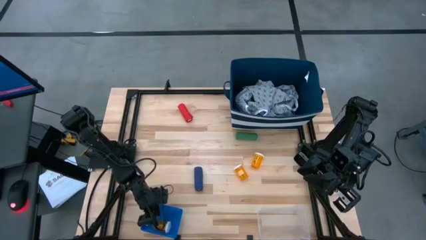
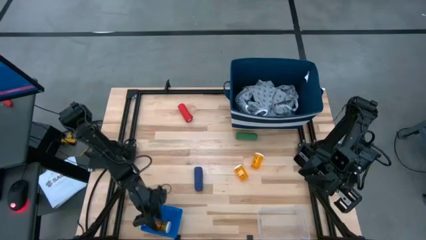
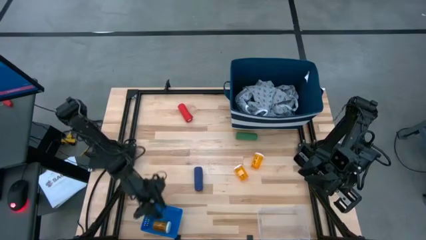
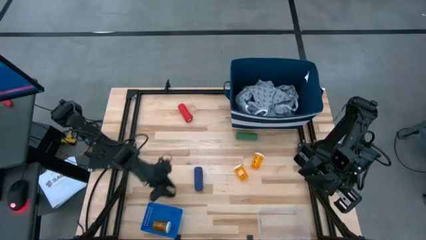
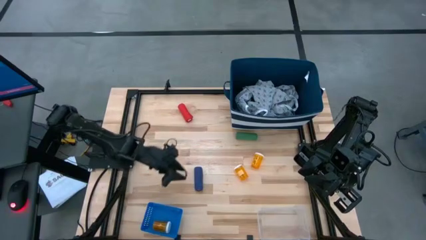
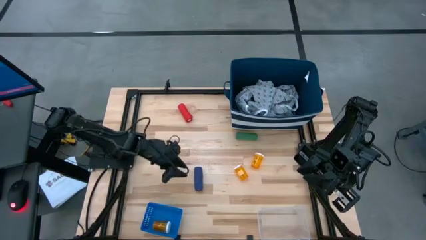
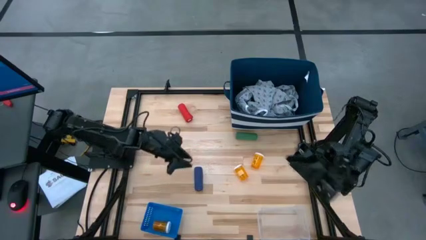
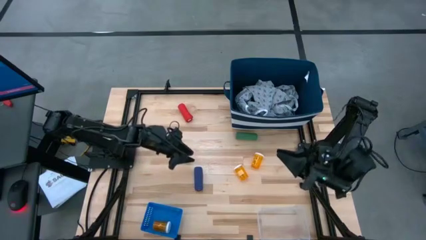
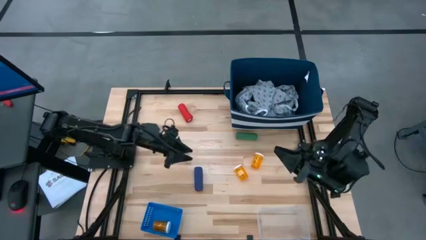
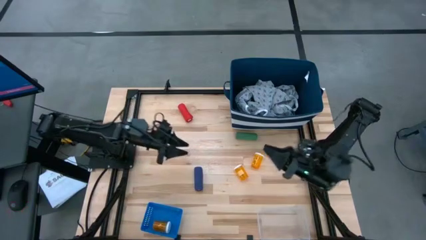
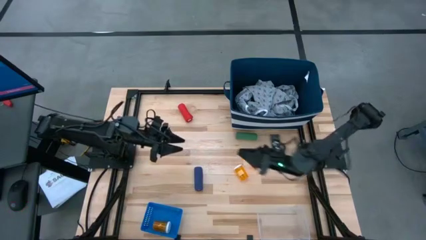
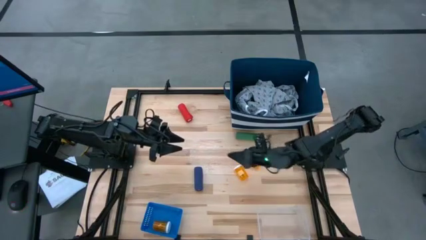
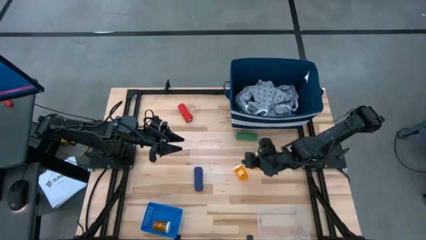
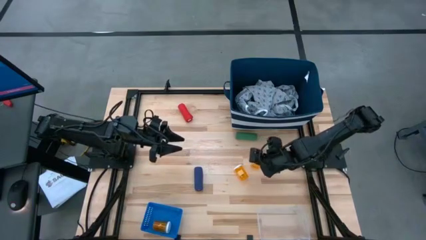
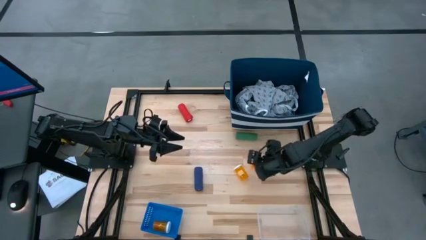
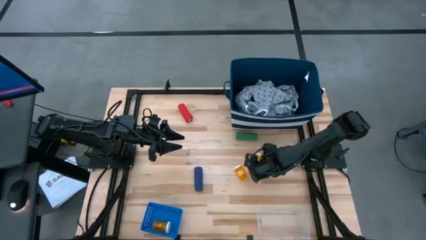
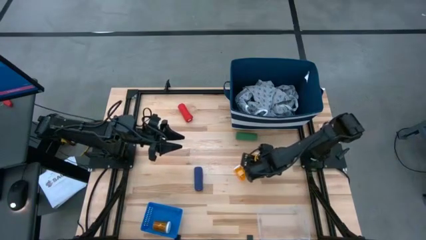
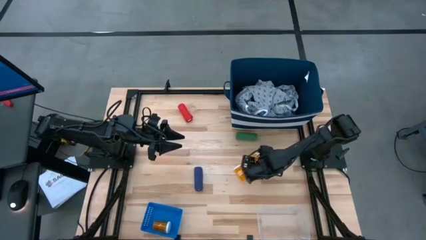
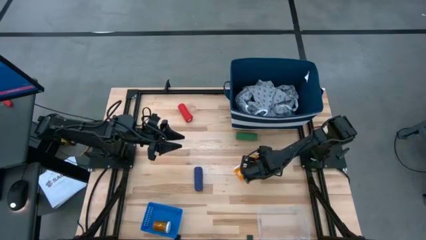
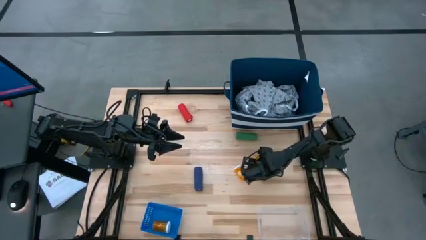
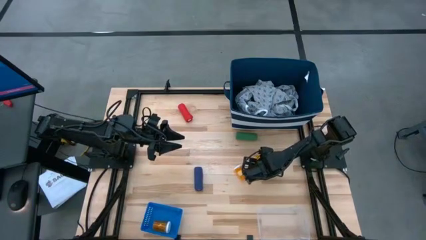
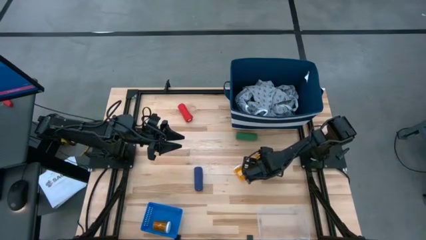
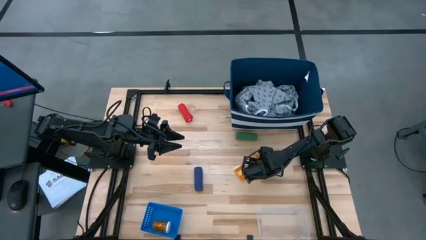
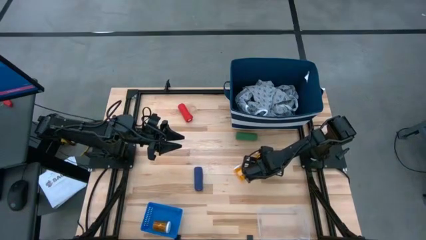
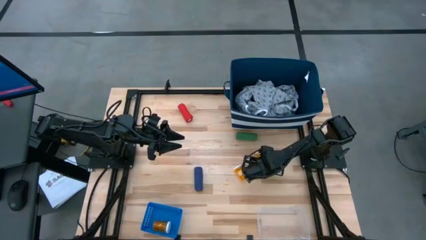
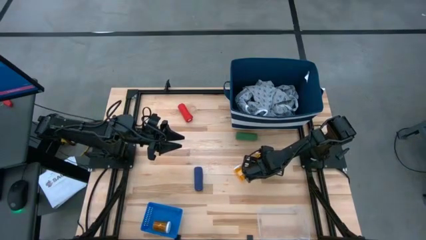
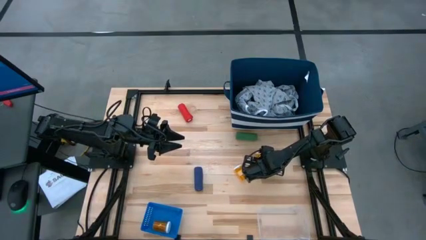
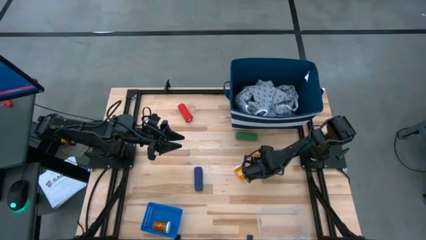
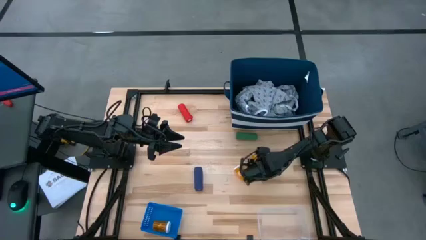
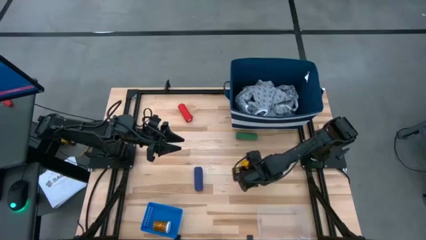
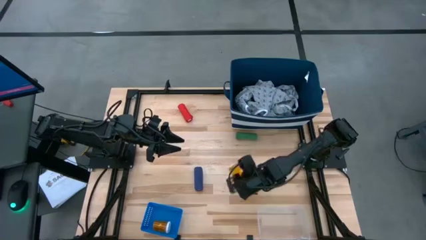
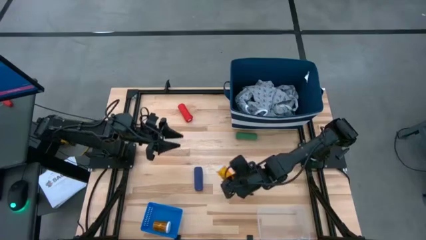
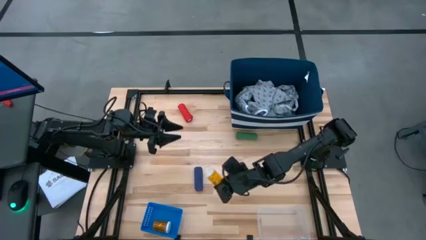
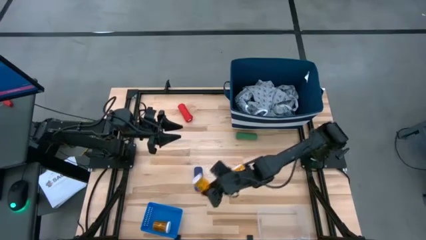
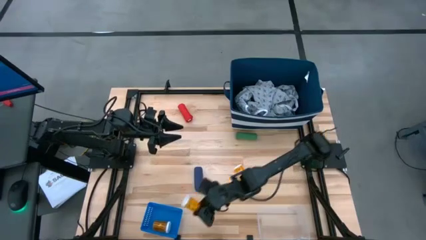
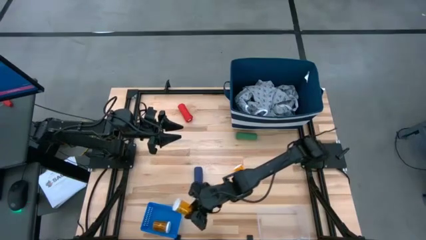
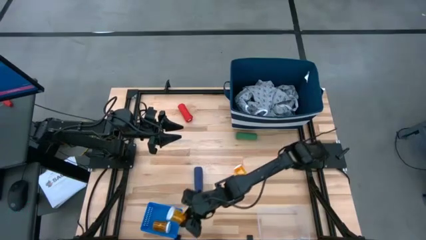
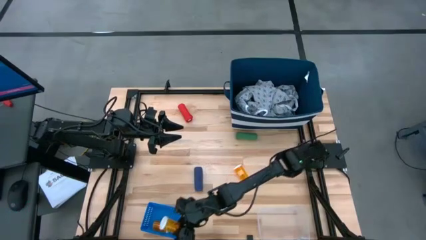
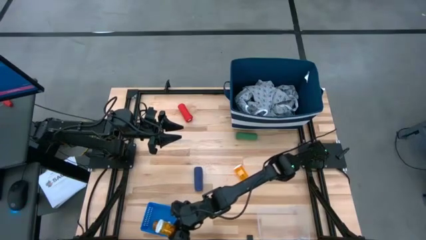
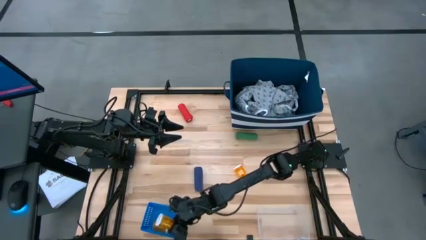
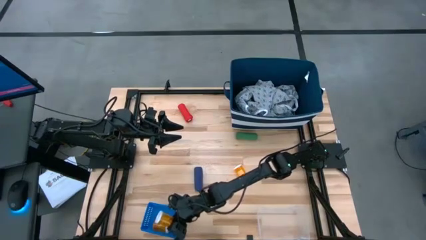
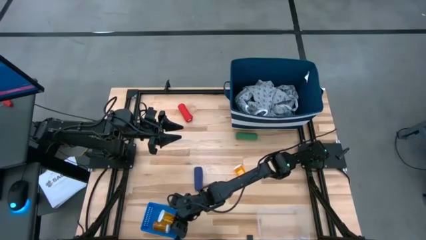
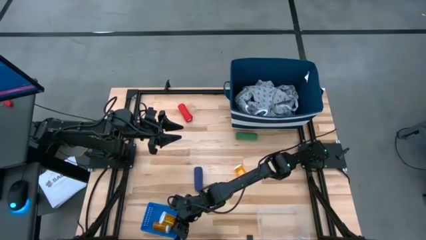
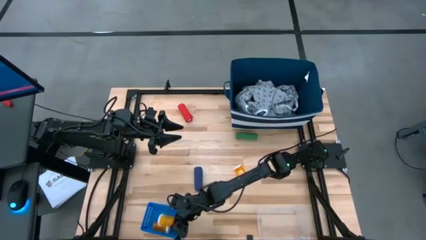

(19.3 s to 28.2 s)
Task: Pick & place medical supplies in basket/bin
Put the right orange pill bottle into the blue basket

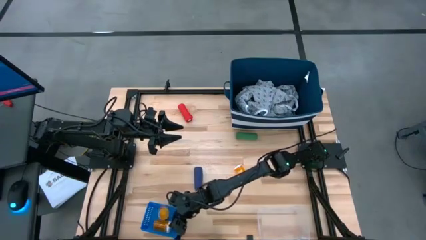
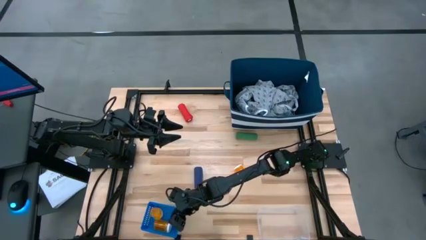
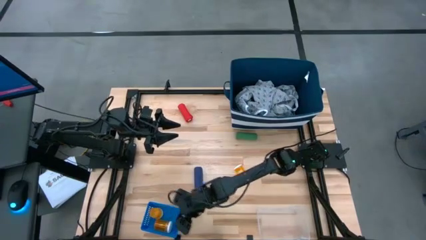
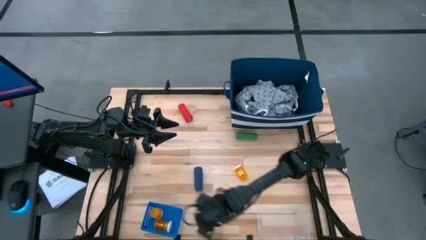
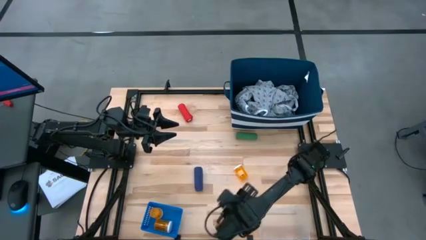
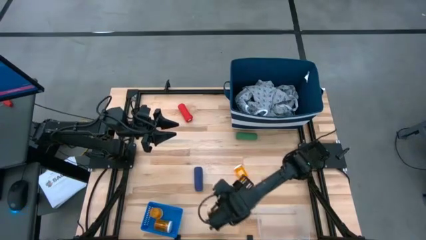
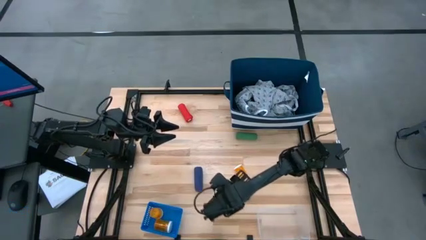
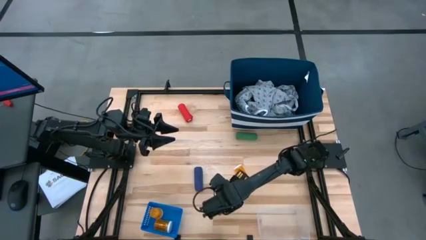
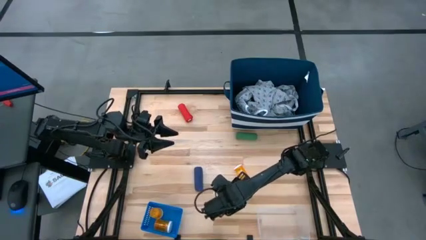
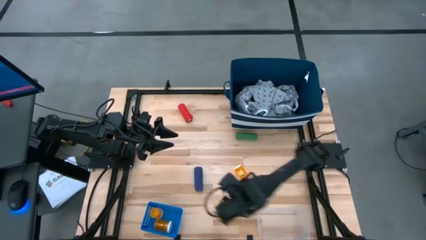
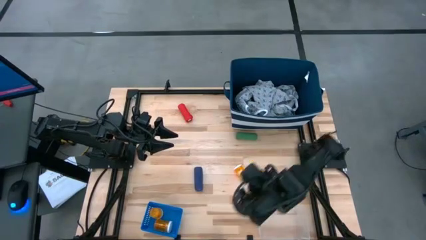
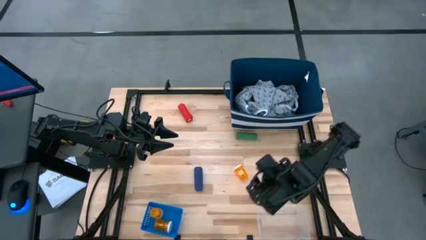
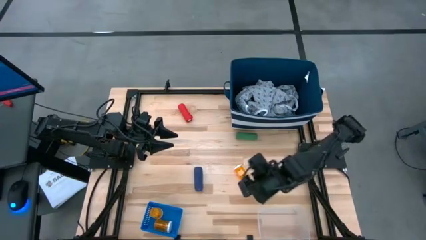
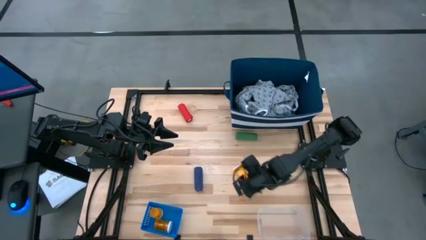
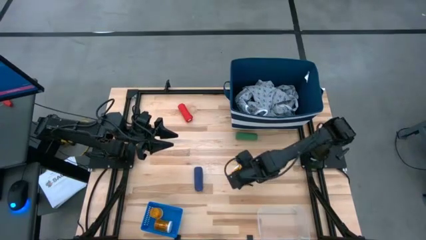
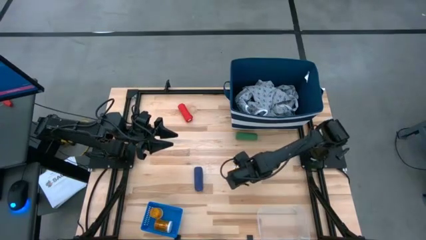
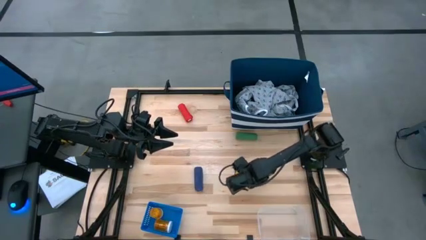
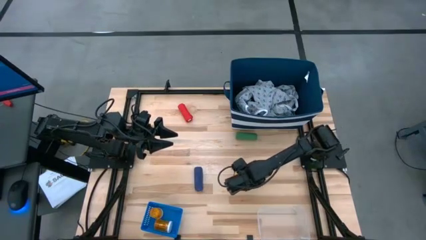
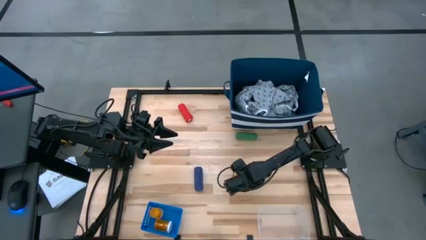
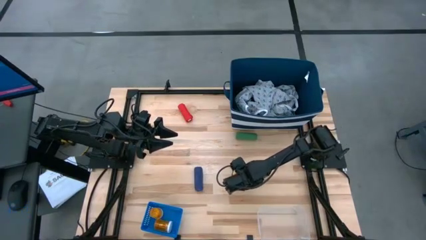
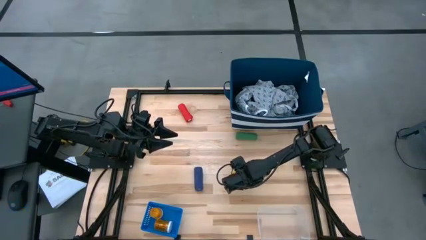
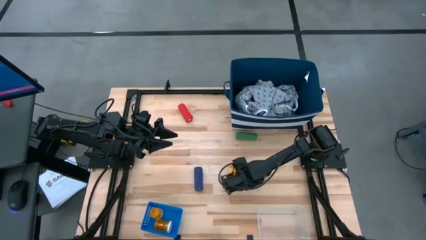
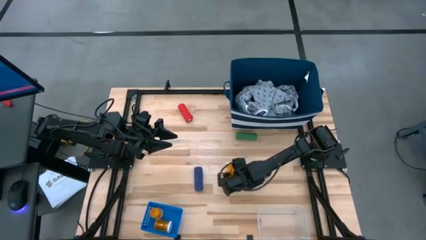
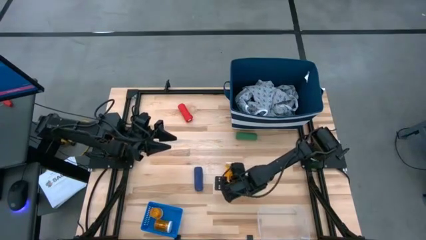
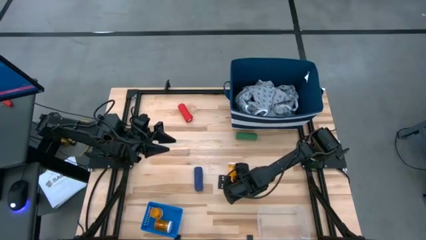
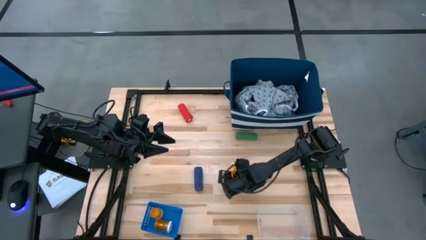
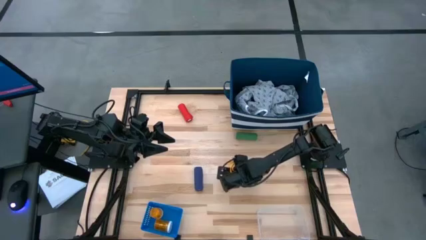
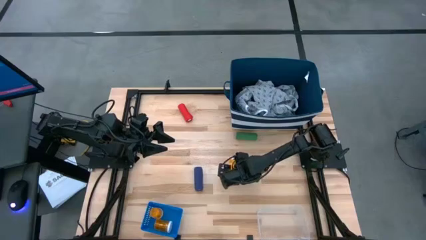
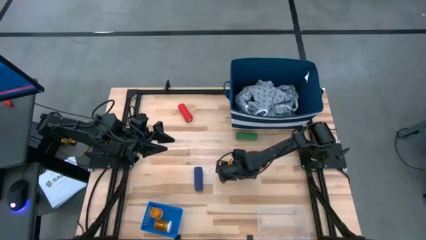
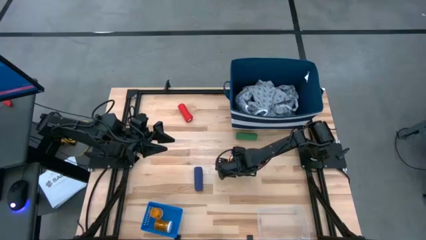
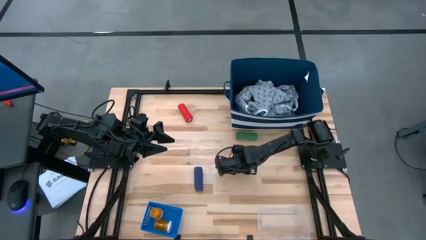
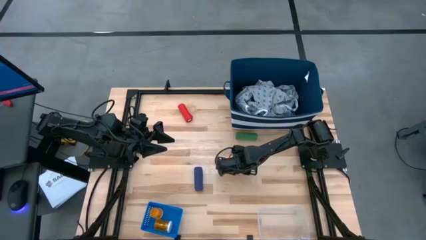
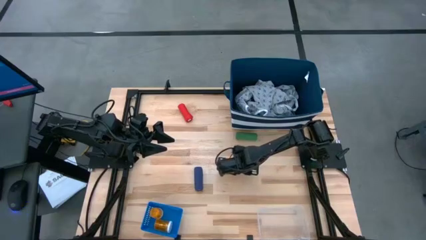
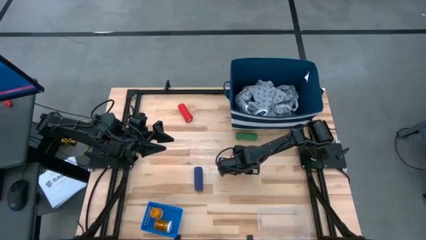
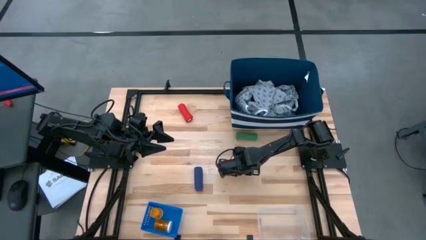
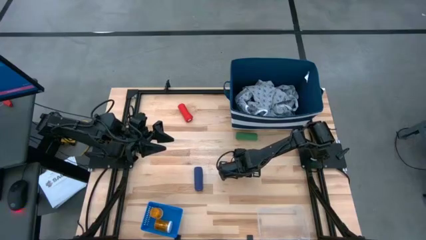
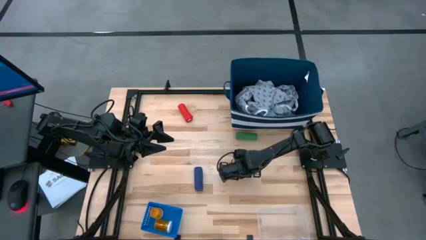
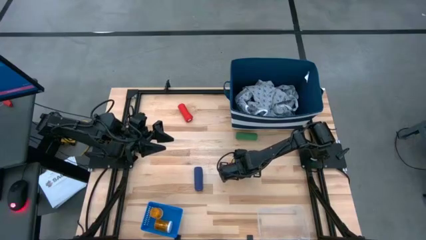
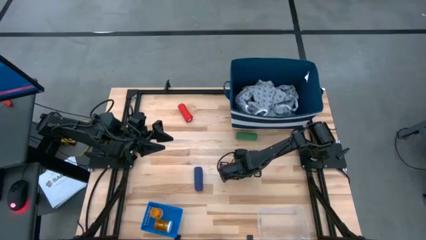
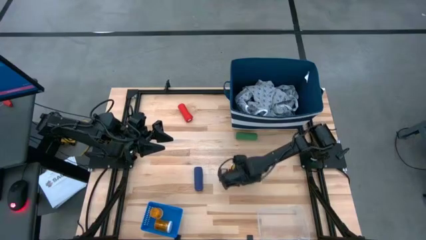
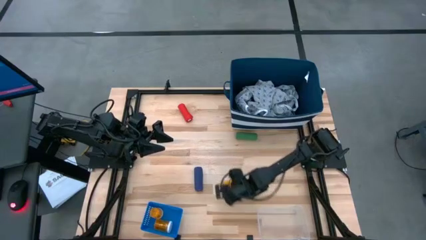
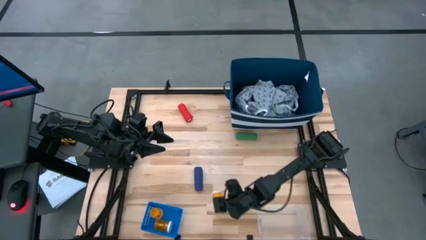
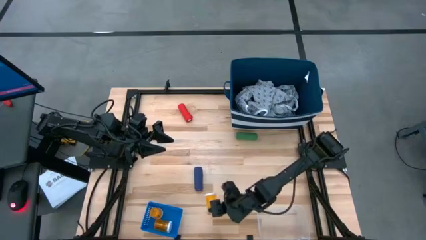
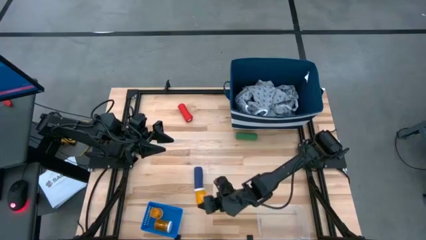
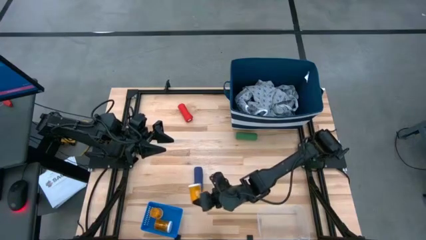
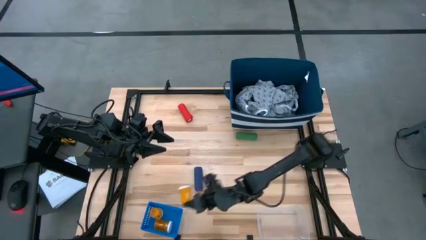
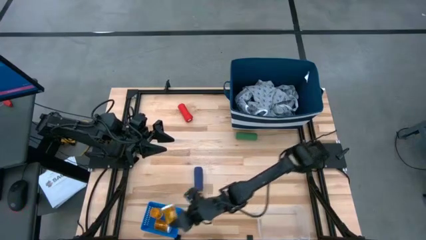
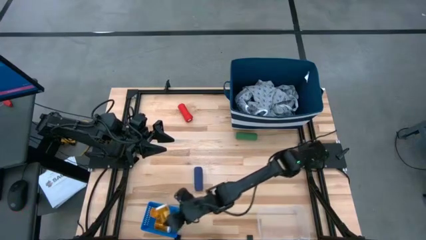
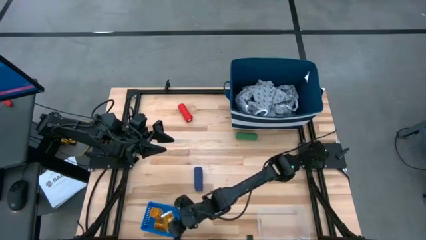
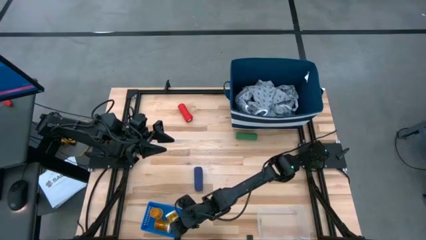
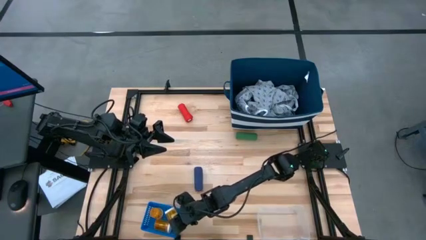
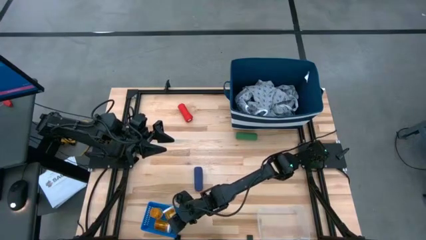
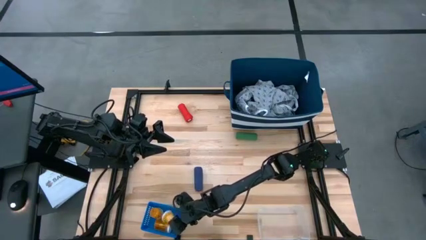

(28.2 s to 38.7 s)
Put the orange pill bottle into the blue basket
